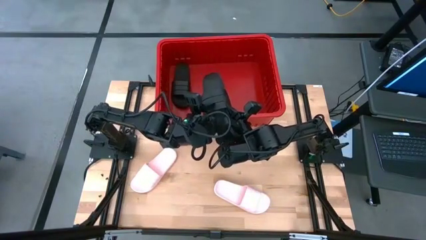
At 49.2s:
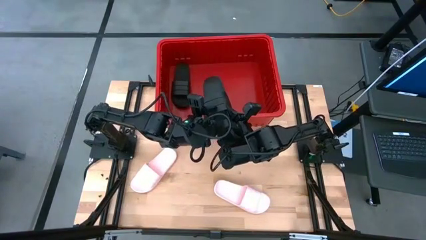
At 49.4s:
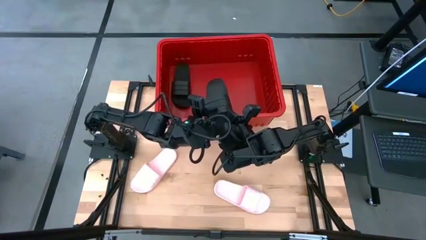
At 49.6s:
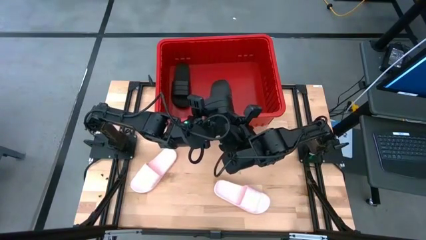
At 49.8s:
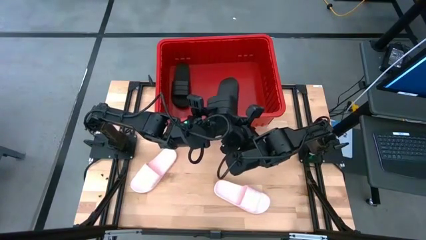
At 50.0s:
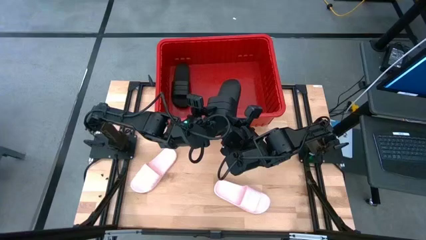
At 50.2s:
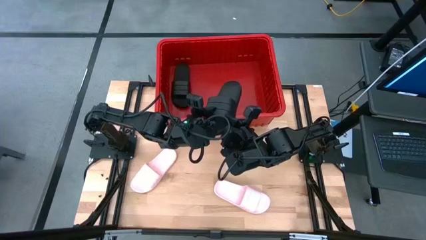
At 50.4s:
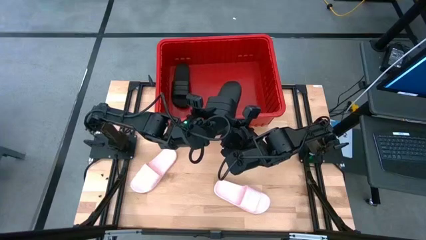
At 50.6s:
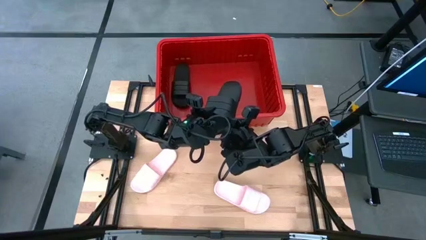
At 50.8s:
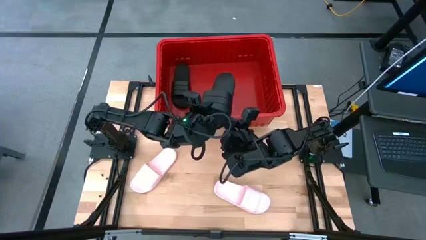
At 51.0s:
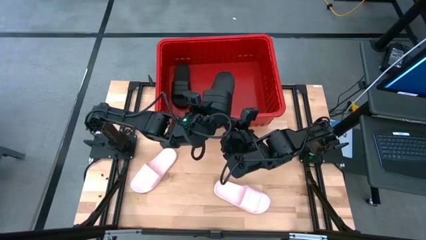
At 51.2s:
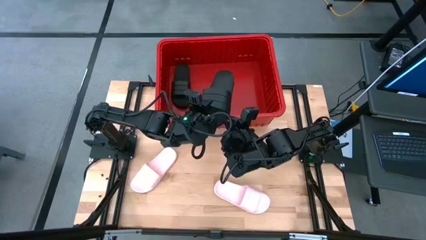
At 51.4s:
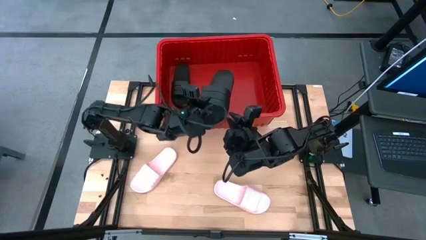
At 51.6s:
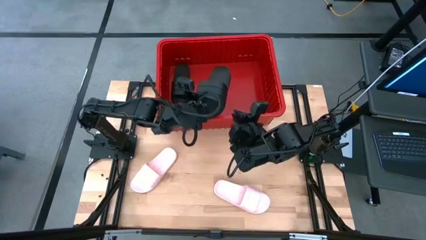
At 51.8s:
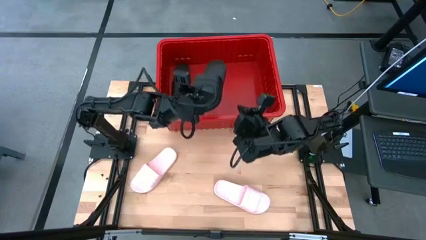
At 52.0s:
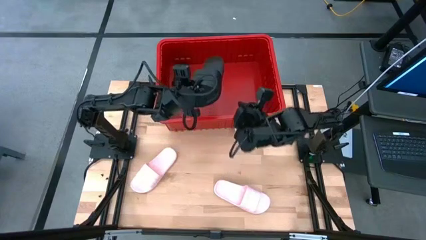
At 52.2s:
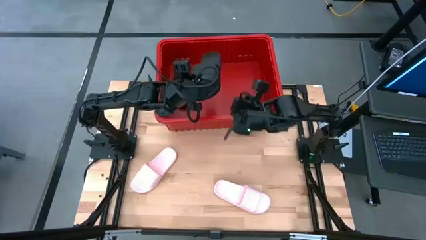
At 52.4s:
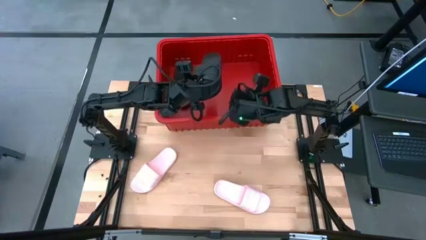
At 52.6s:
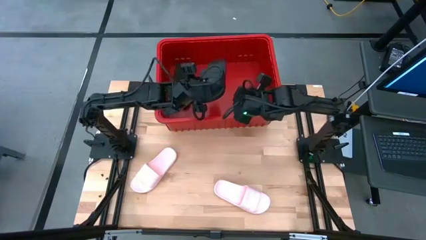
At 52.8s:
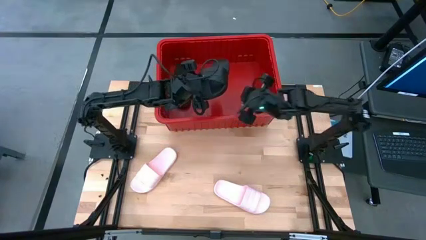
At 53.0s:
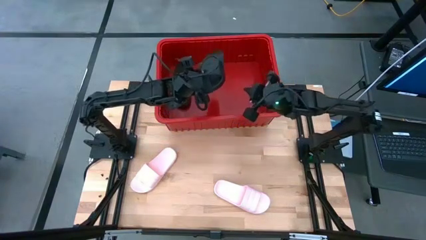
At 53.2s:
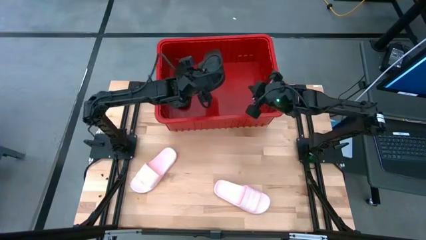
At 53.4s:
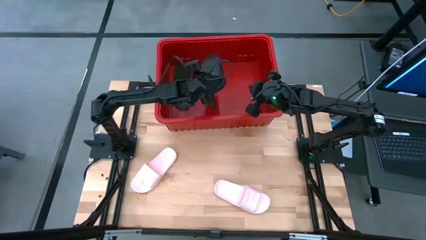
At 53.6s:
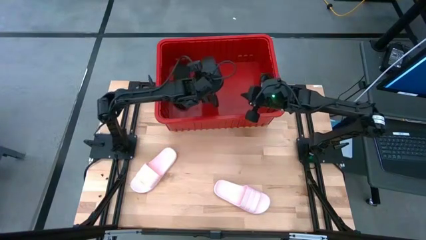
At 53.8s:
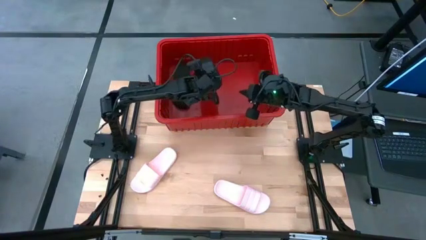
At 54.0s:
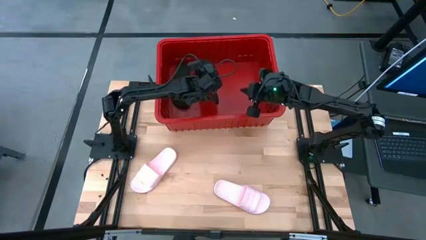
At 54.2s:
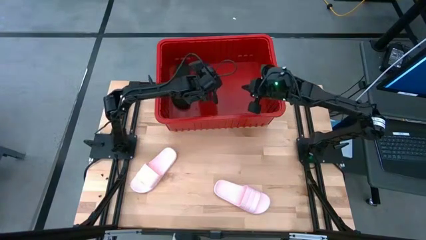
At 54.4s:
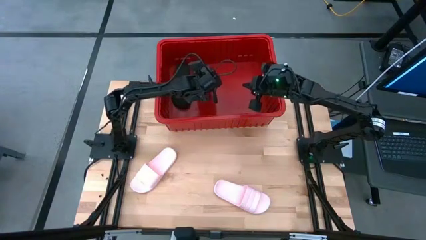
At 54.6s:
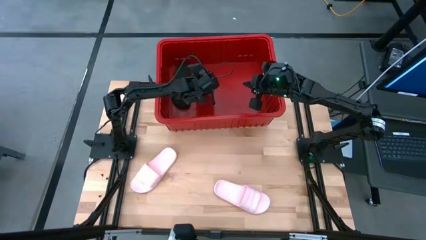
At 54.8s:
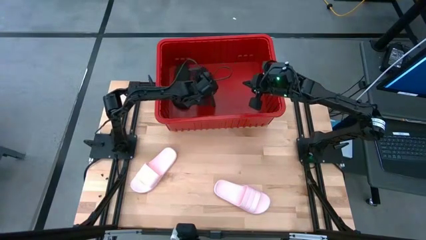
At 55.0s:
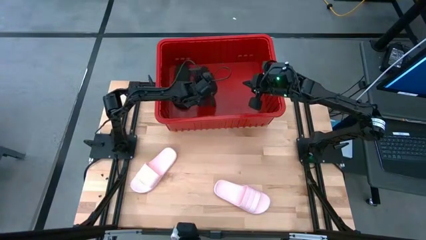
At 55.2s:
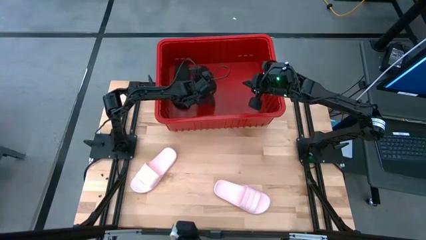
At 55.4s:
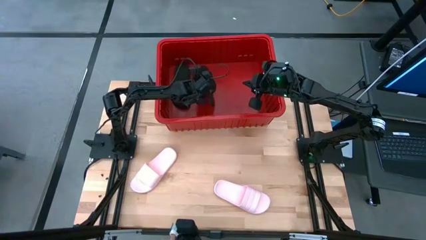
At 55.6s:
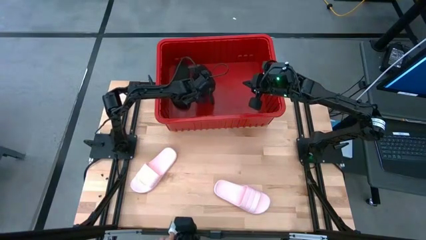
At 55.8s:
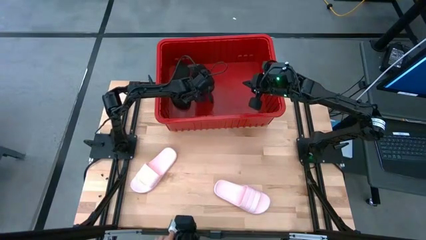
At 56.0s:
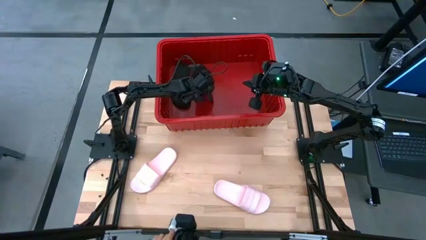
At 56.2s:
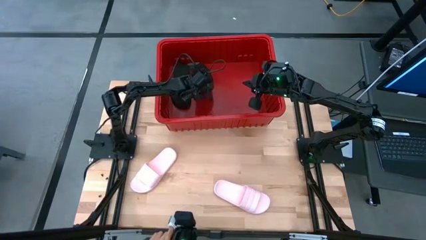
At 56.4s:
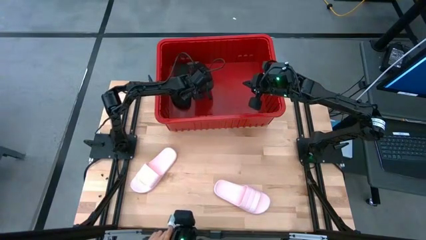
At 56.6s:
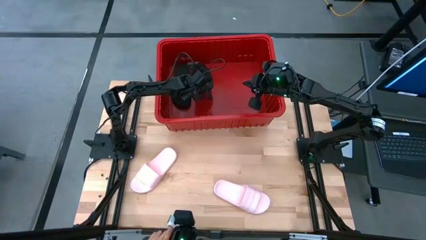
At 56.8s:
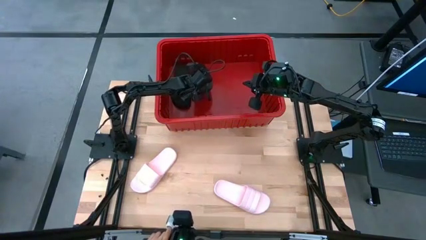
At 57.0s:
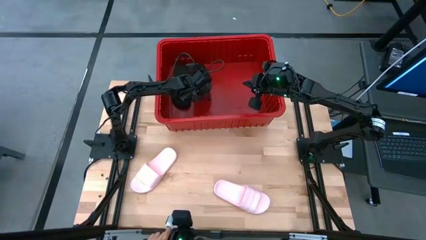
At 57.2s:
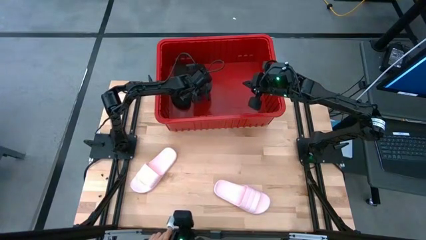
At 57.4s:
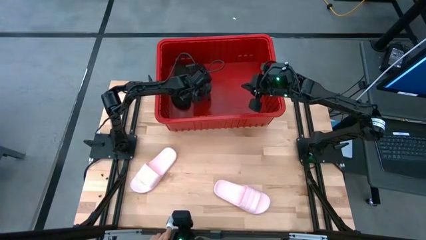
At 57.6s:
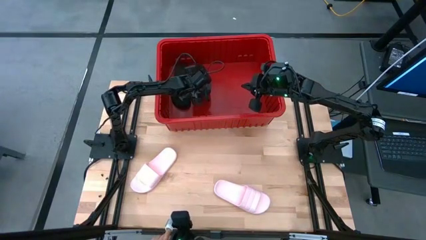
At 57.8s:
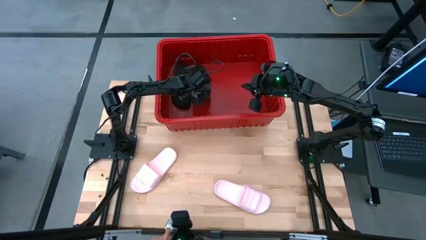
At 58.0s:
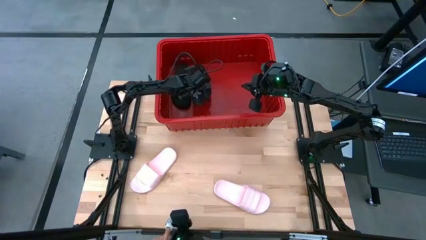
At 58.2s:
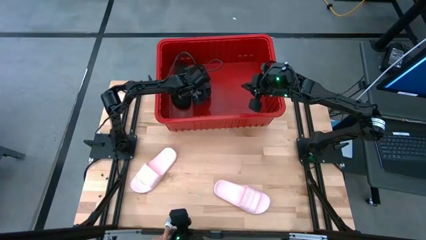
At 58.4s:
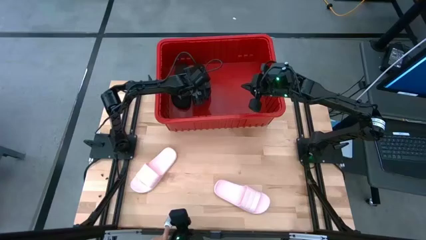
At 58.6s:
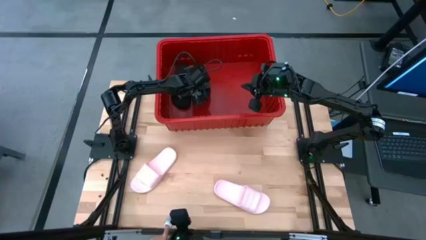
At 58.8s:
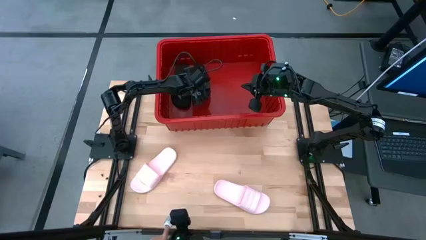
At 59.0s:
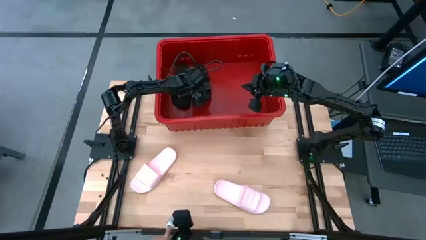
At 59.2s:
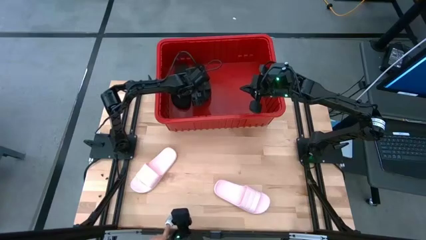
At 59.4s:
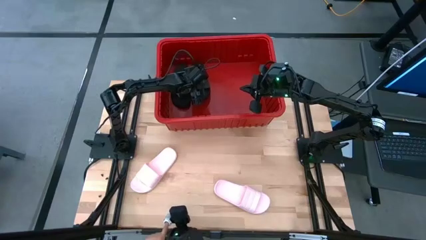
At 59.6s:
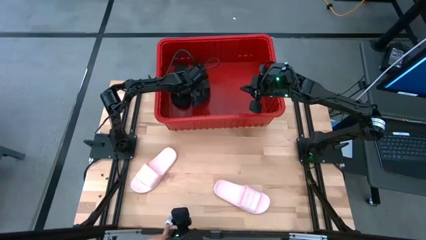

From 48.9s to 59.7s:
Task: Pick and place slides into bin
Put the black slides into the red bin

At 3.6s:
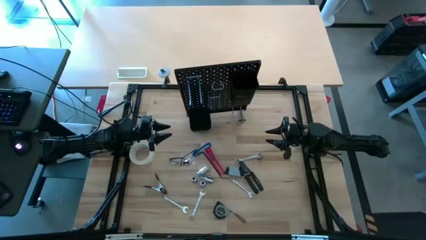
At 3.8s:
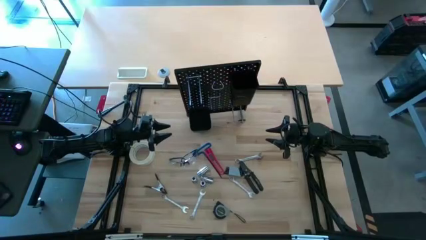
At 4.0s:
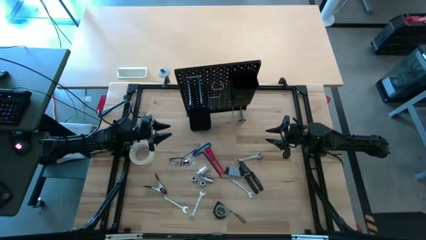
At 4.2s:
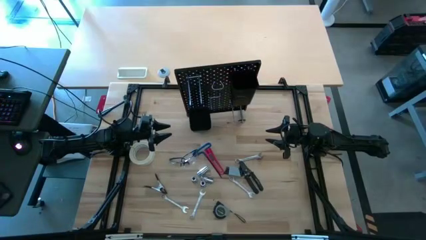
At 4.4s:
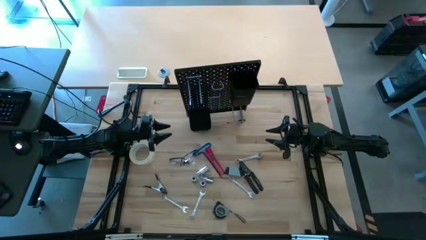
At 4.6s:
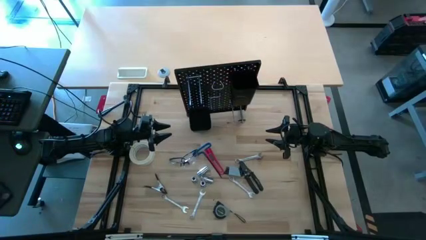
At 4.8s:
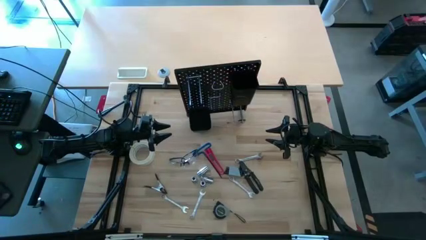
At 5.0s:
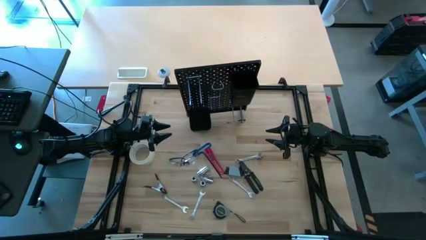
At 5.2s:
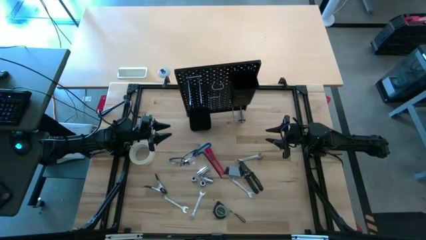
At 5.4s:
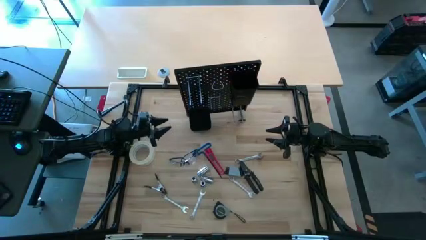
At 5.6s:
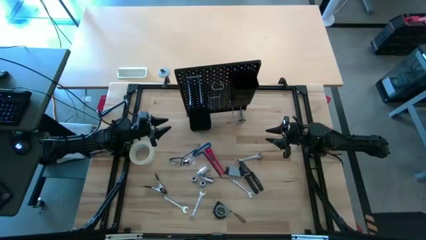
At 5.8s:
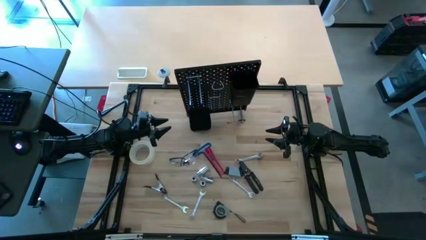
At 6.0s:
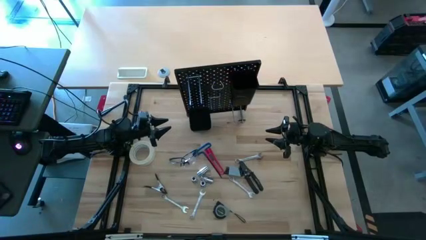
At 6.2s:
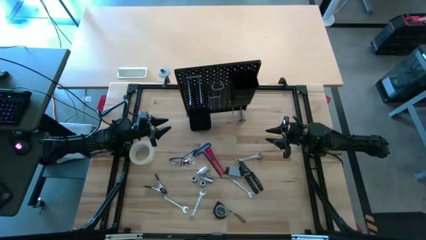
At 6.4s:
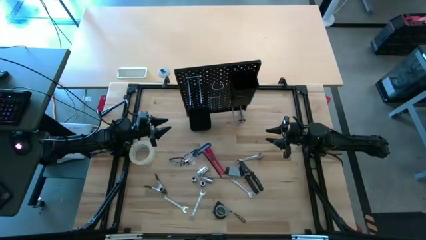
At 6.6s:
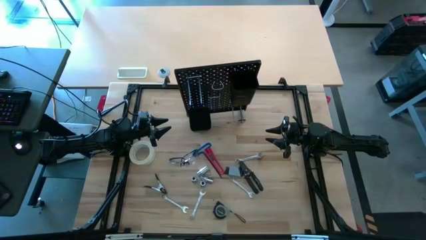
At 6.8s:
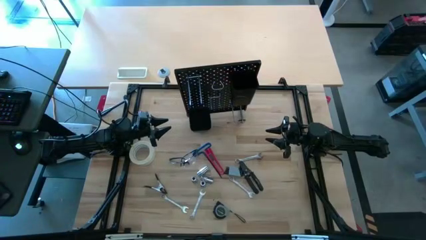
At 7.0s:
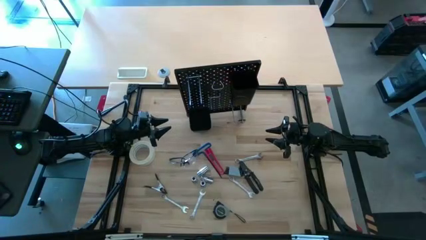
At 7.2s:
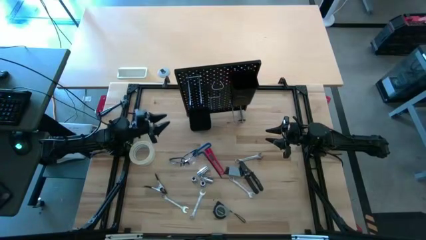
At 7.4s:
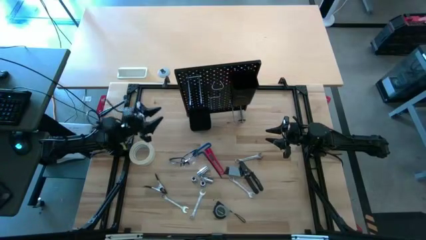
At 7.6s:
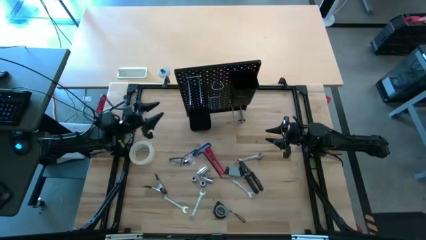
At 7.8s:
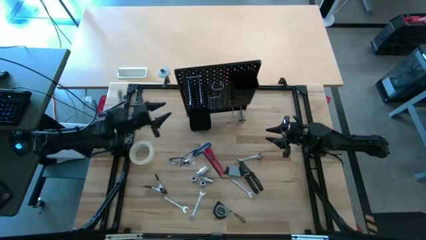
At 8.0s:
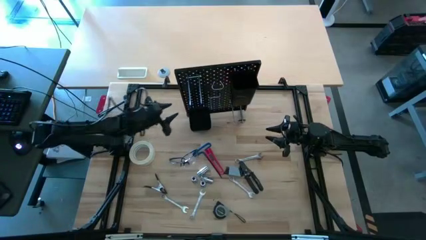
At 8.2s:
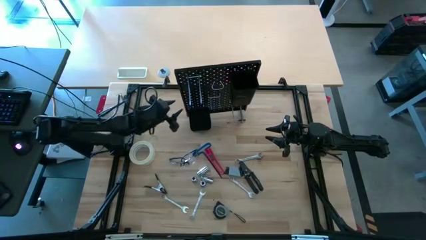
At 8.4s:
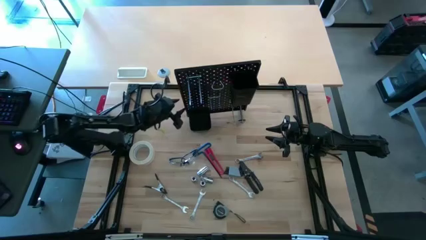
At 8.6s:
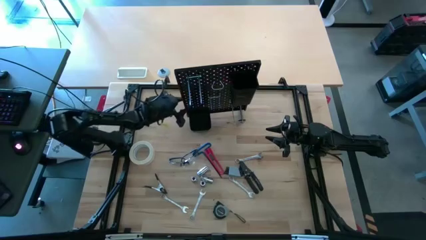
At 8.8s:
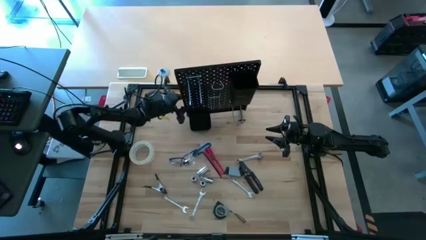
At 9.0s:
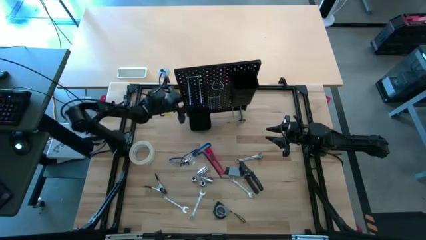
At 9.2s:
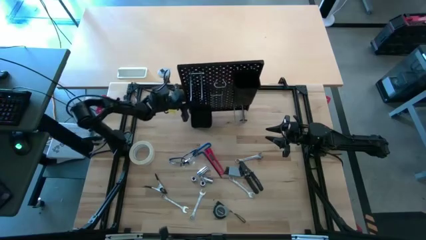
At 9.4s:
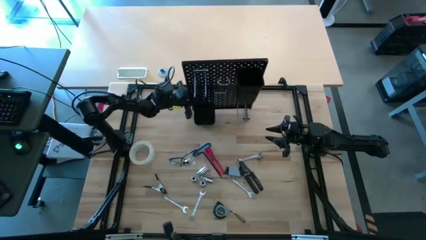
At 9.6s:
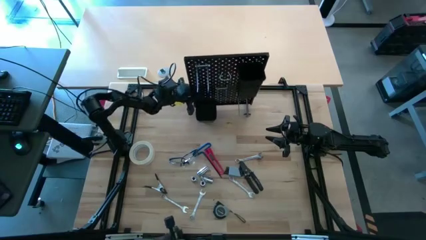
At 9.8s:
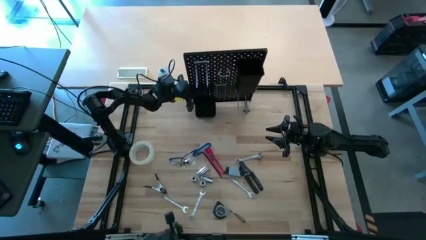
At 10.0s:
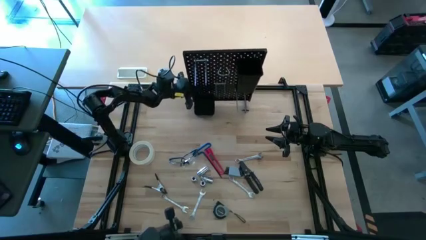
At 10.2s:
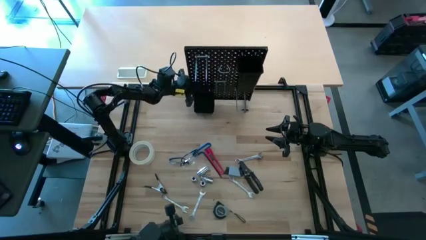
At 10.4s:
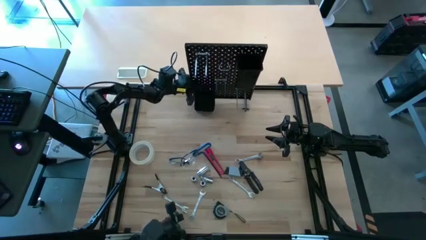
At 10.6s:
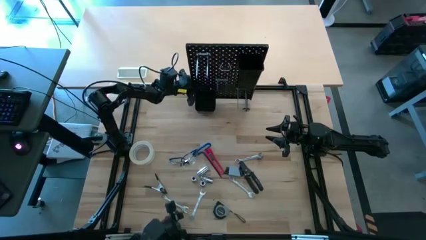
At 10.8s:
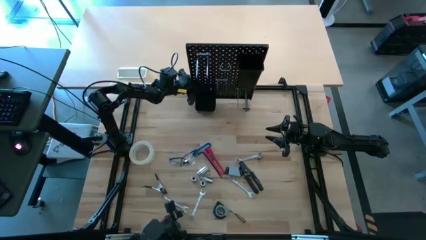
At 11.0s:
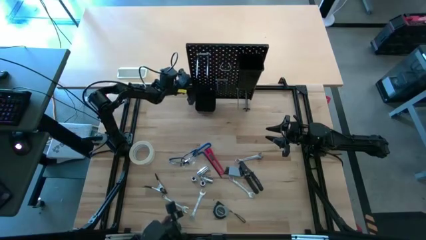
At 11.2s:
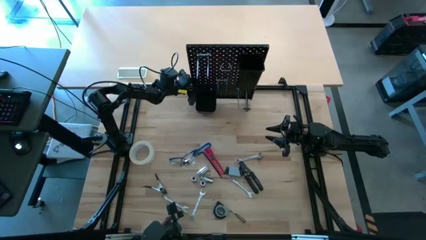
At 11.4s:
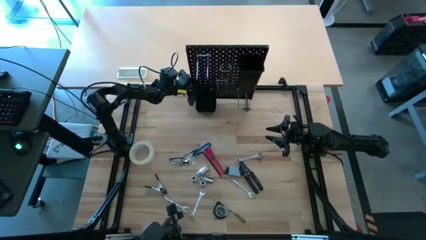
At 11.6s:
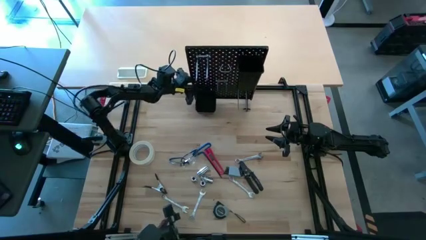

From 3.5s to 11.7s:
Task: Hang tools onto peg board
Adjust the peg board
